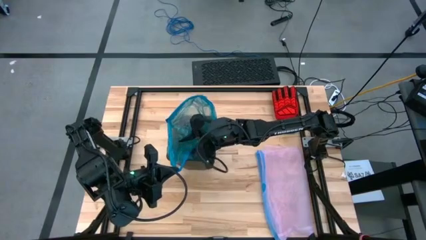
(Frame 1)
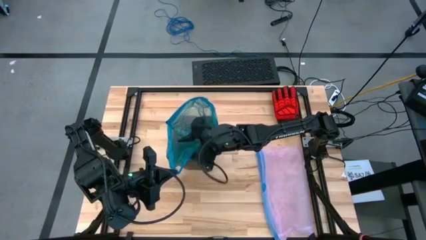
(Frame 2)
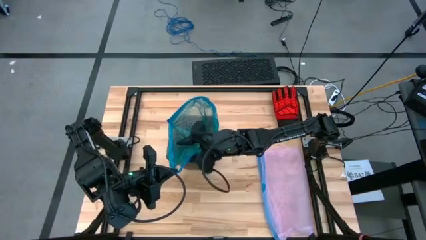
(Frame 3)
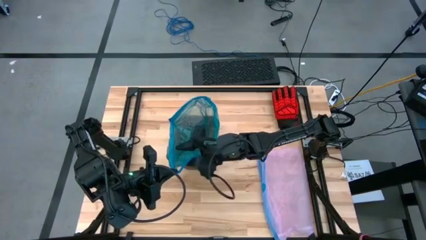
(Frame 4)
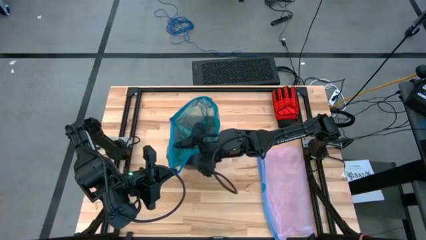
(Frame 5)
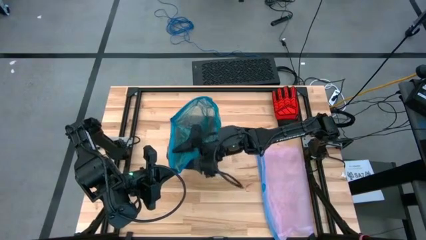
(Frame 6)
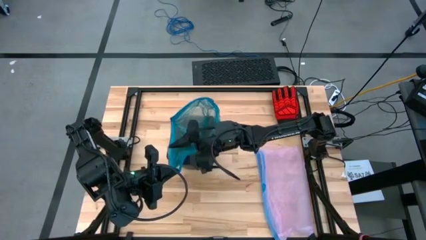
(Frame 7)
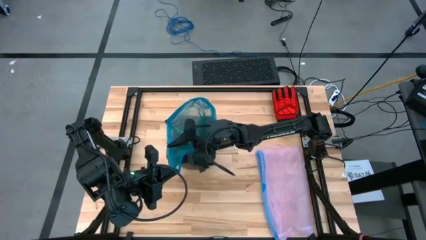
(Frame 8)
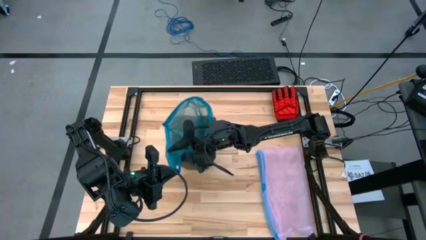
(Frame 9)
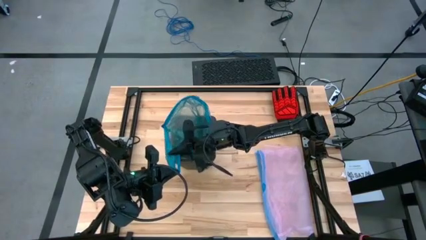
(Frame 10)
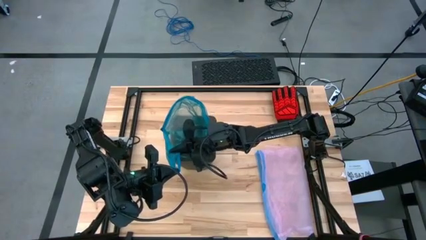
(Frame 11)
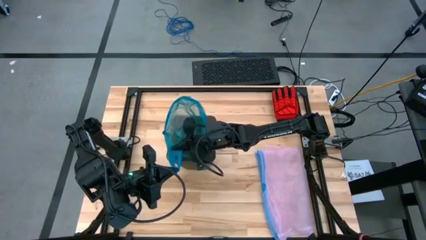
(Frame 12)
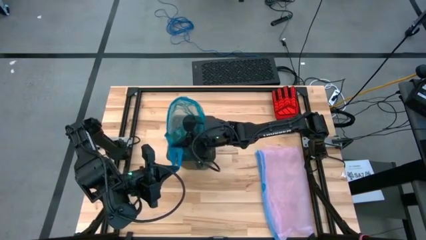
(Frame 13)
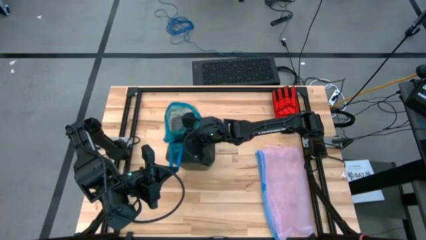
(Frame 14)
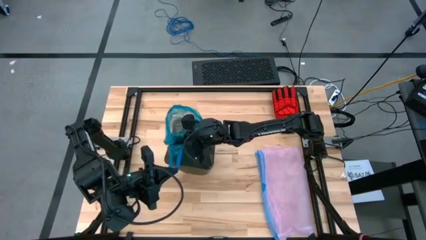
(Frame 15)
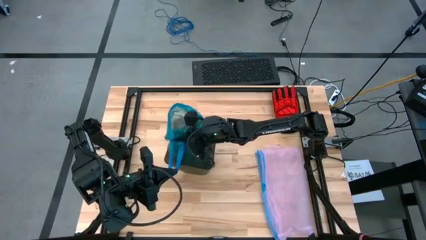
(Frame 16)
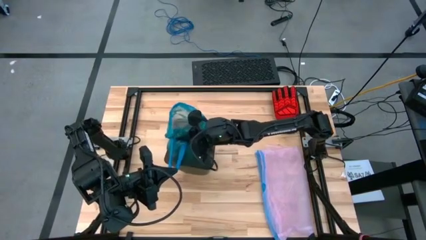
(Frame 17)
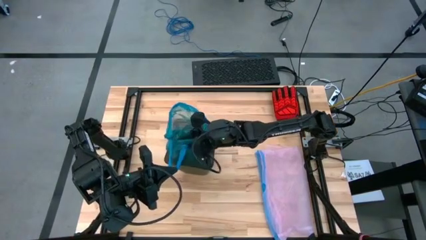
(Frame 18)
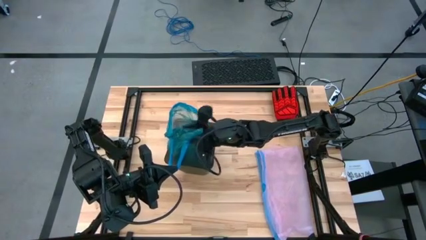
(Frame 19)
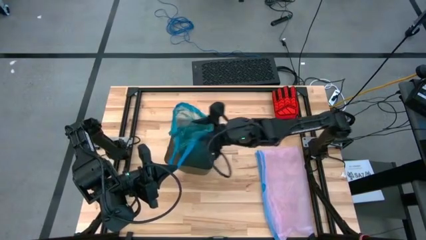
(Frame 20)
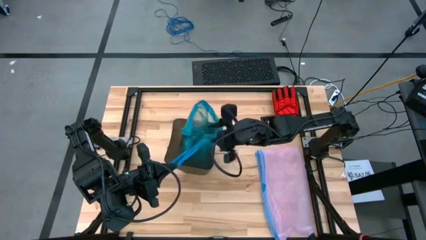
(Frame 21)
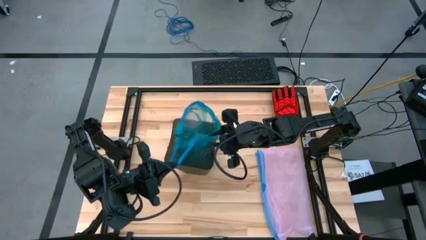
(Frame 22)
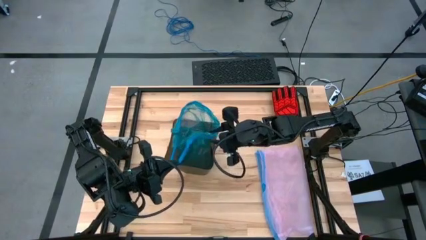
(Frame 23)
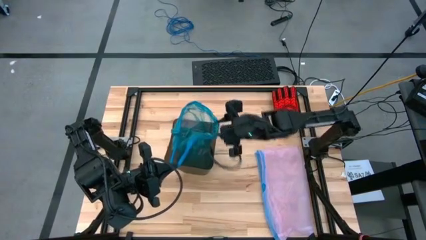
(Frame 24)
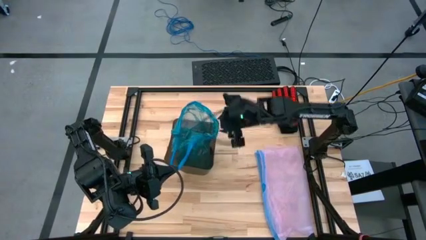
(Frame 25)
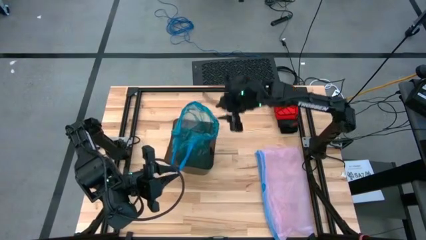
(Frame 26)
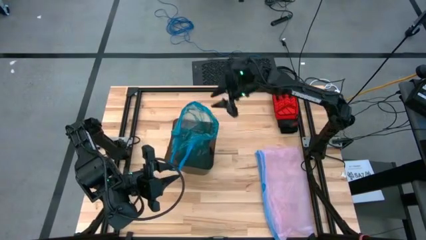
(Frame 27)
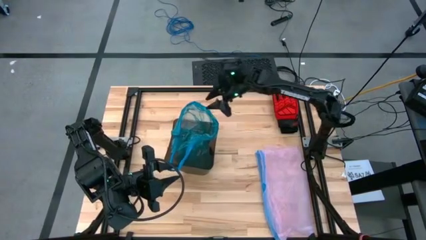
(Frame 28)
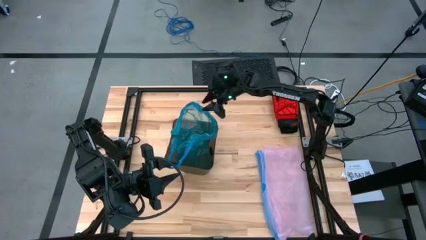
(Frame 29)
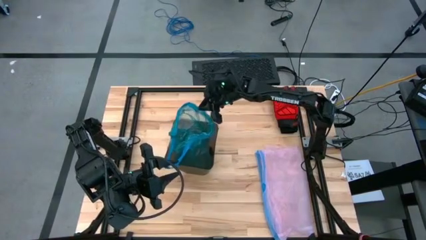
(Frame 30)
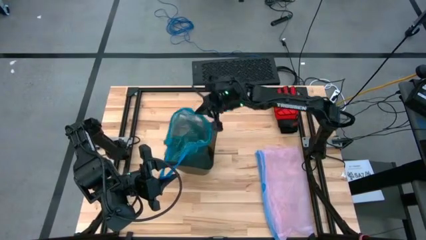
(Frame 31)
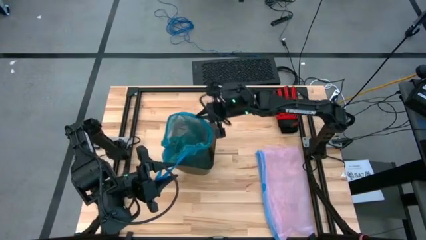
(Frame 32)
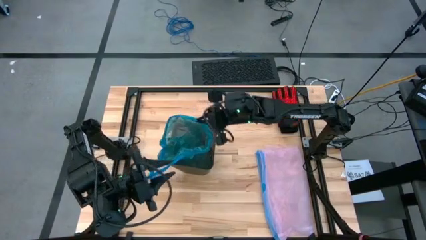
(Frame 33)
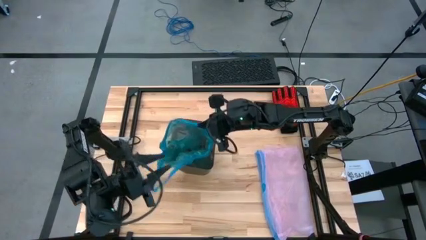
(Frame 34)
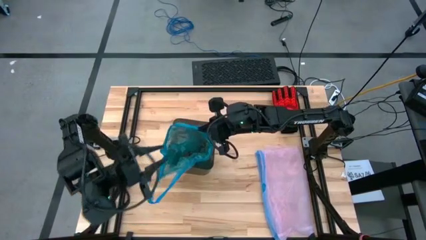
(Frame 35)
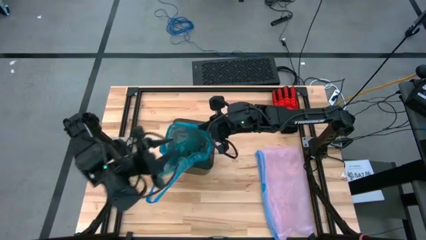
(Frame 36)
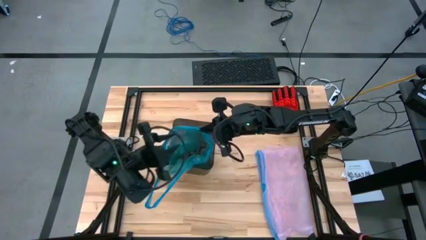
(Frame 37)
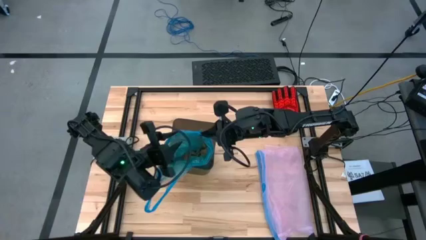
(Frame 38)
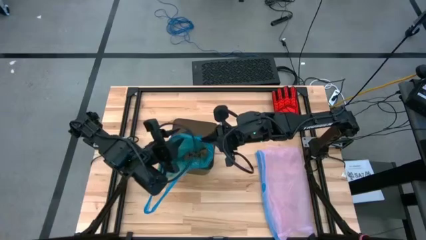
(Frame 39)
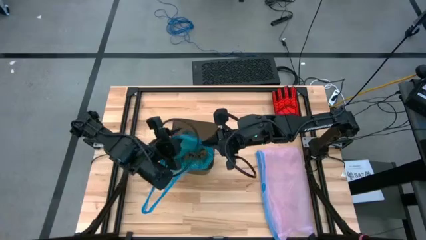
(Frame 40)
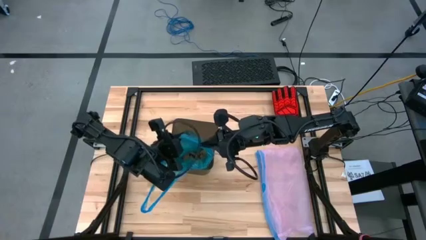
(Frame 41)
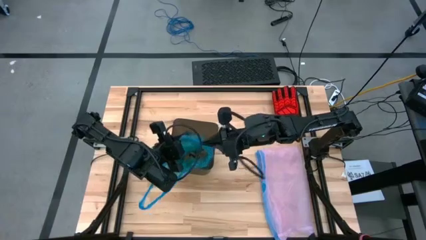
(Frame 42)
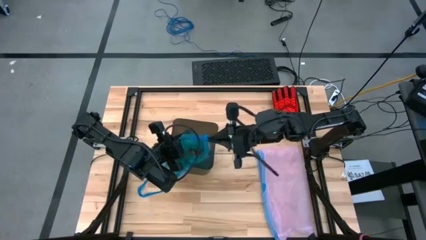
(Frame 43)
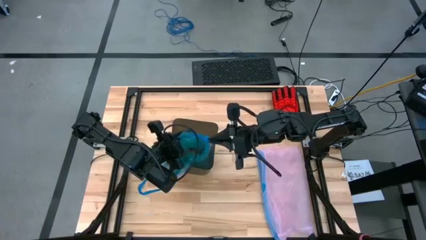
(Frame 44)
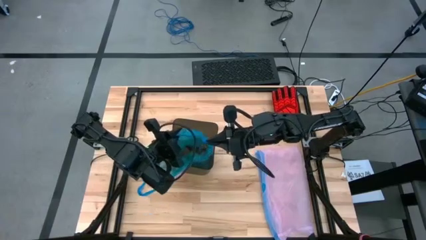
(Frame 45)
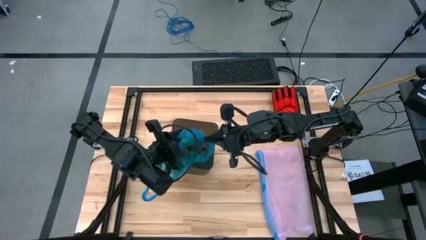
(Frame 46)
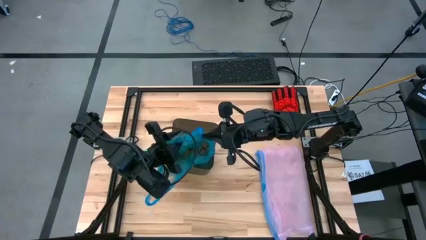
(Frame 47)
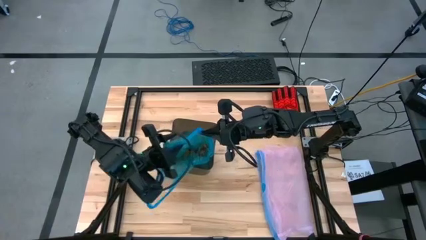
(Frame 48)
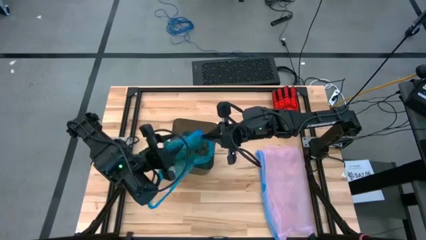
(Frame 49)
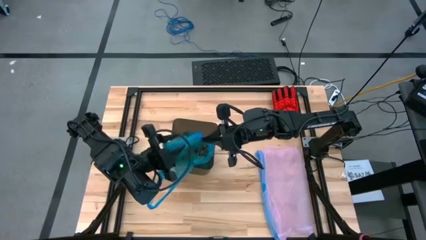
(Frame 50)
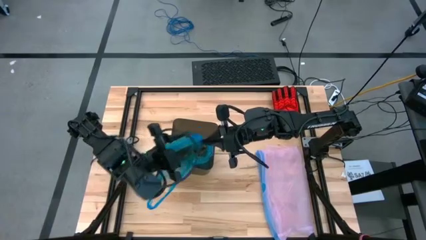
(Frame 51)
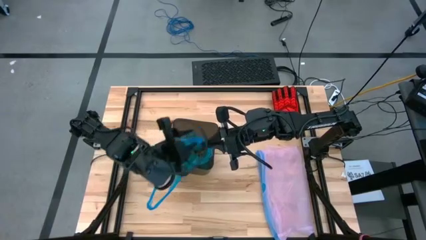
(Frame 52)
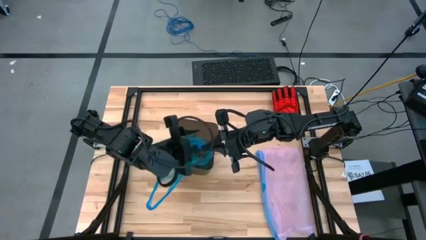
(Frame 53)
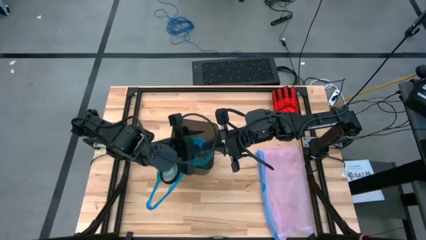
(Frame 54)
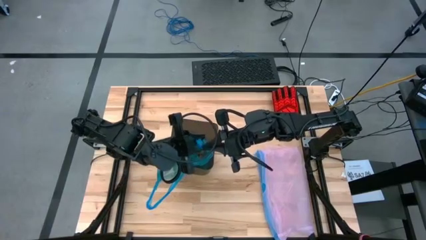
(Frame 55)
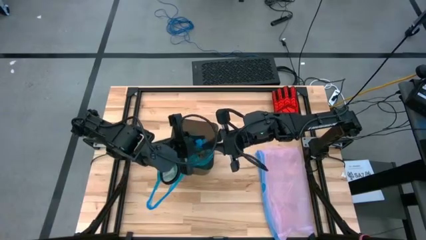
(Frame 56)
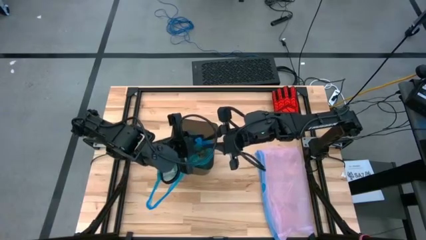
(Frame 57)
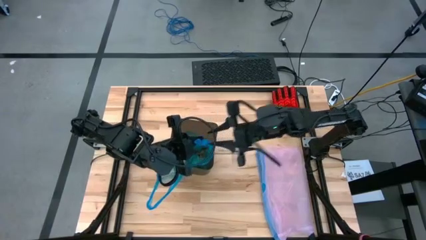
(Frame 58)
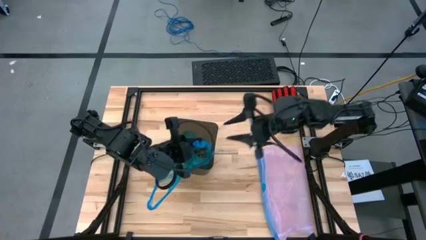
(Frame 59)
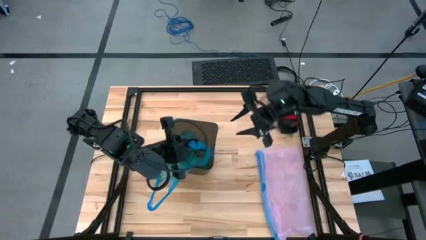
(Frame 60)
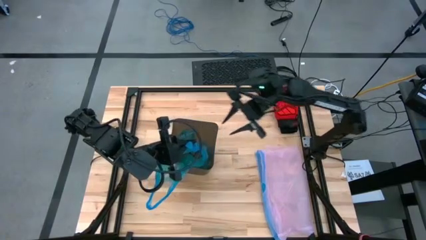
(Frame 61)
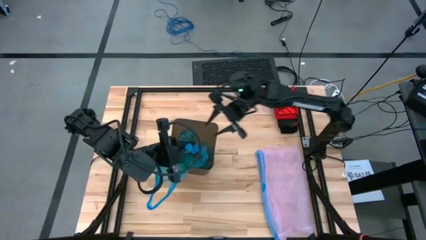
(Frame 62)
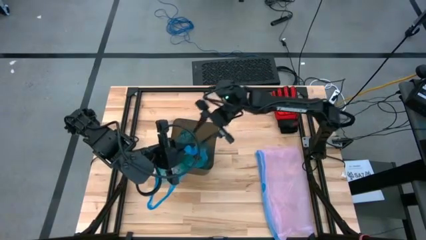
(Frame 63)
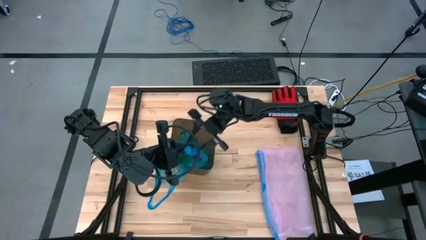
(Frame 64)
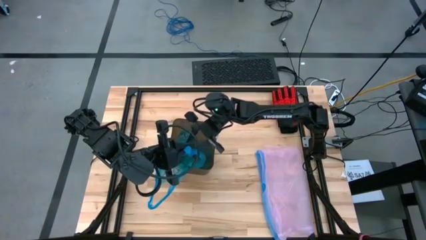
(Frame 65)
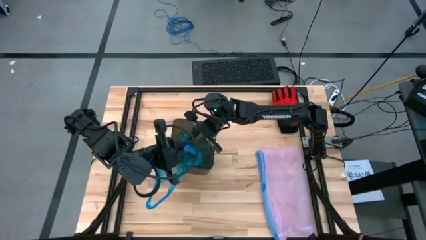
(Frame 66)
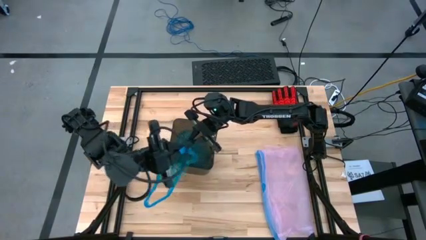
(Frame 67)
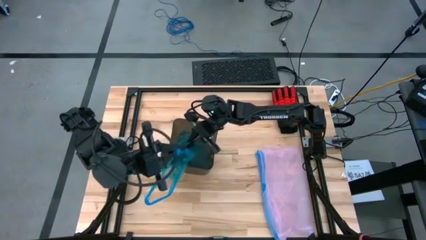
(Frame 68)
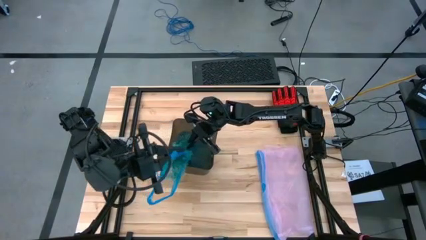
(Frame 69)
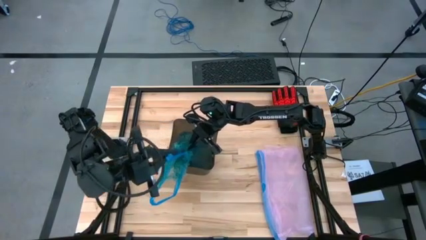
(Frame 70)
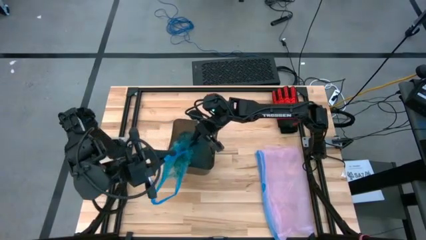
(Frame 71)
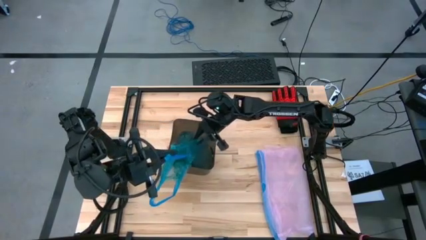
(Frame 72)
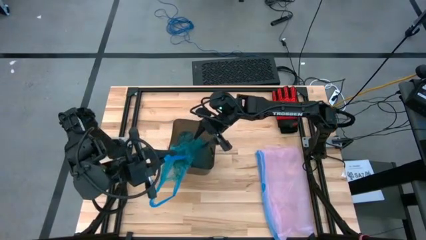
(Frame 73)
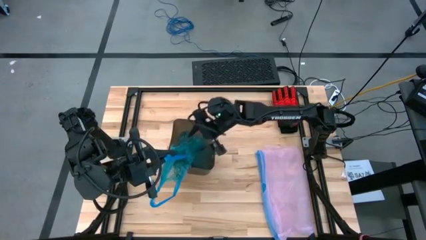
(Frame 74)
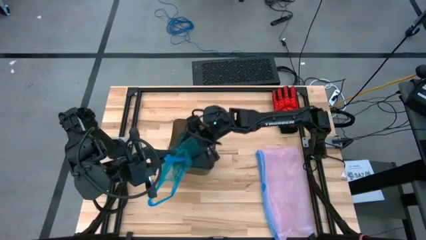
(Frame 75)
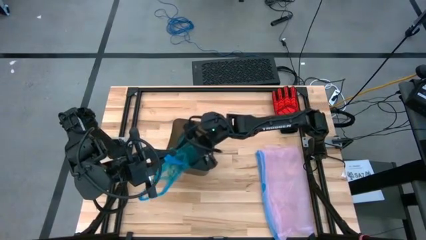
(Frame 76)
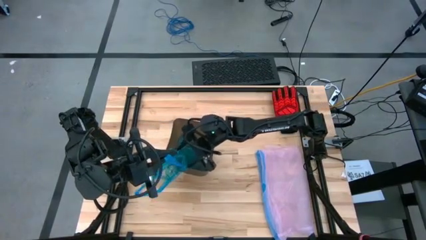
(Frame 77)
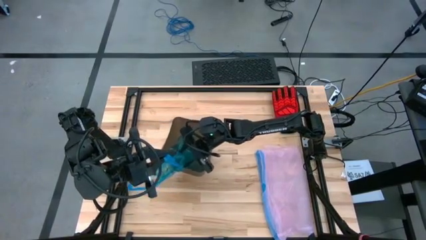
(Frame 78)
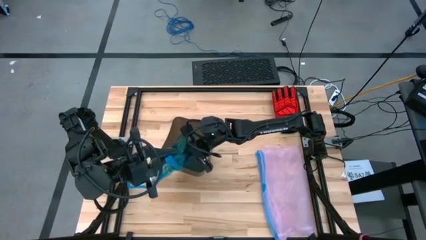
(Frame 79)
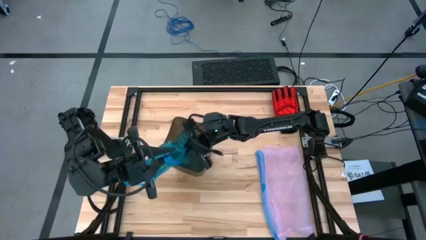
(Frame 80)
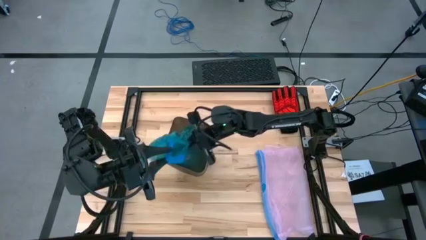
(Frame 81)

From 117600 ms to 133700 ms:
Task: place trash/remove bag and relplace
Close the blue trash bag

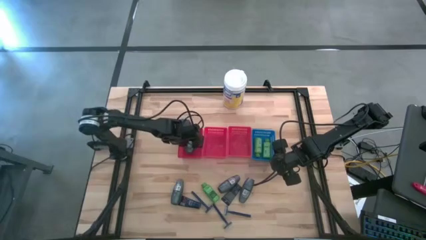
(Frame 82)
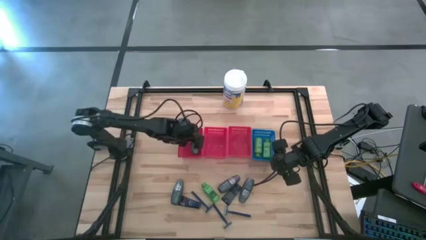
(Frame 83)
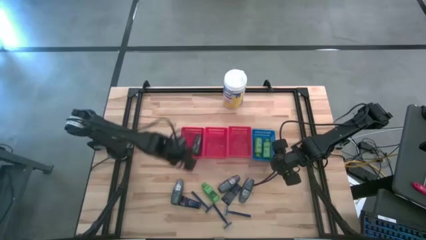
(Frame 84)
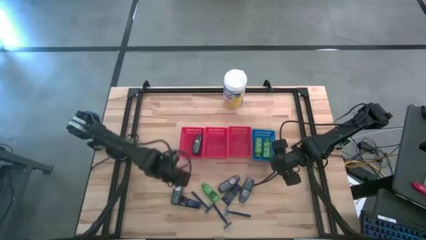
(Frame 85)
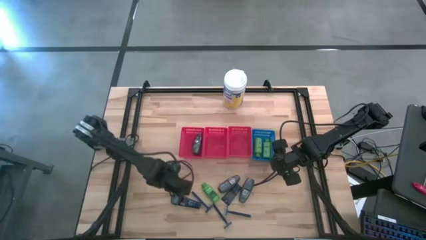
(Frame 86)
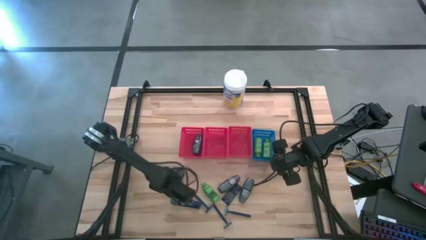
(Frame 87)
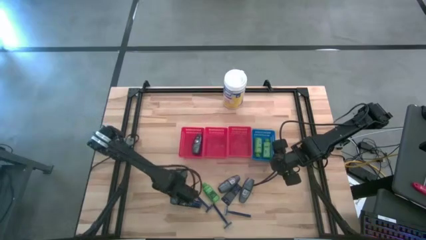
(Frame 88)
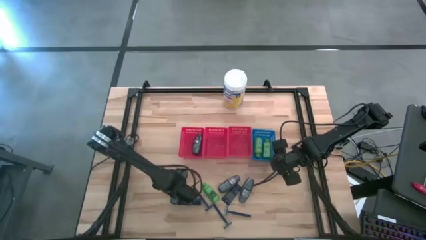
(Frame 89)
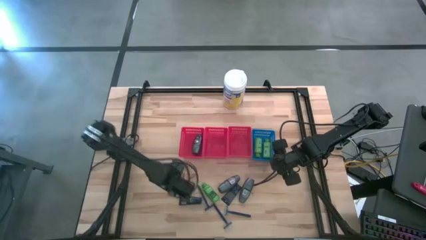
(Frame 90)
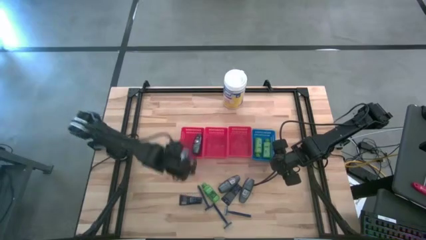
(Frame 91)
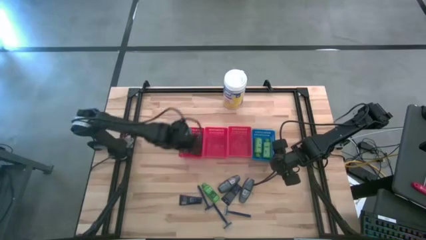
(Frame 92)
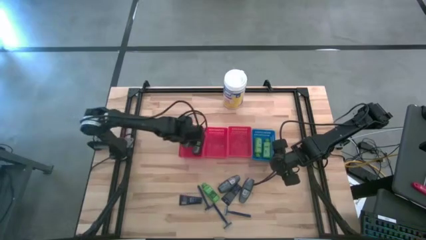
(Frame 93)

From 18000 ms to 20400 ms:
Task: Pick & Place Travel size toiletries
Put the black deodorant into the left red bin
